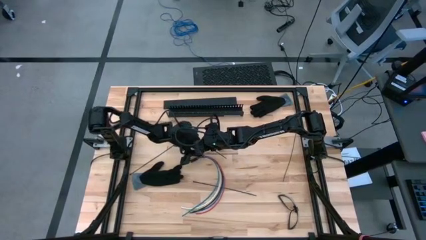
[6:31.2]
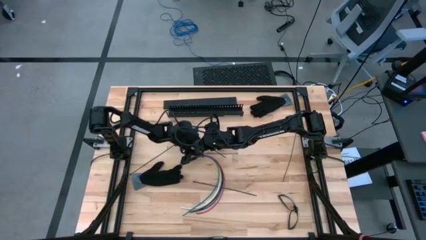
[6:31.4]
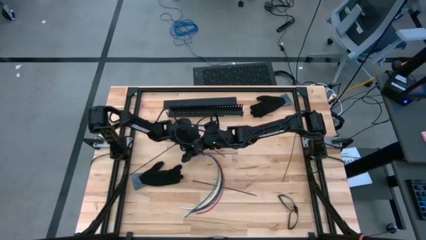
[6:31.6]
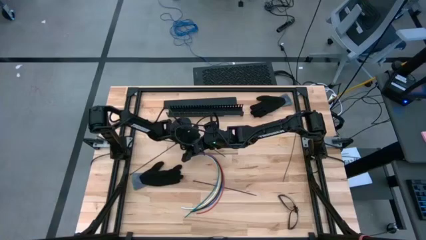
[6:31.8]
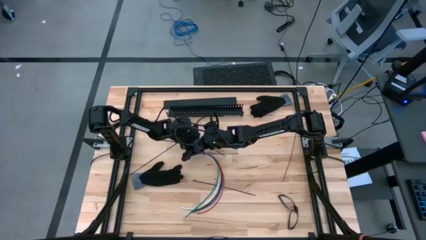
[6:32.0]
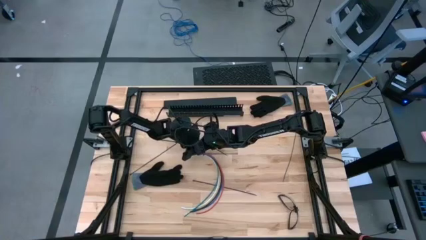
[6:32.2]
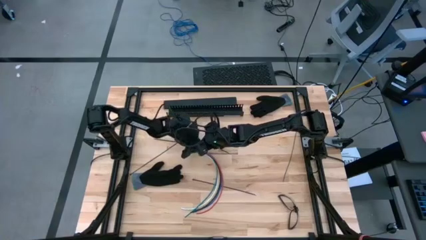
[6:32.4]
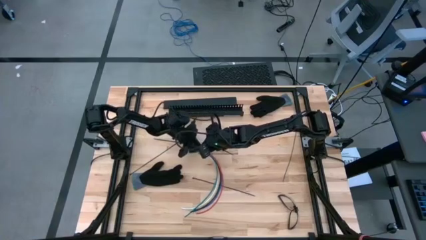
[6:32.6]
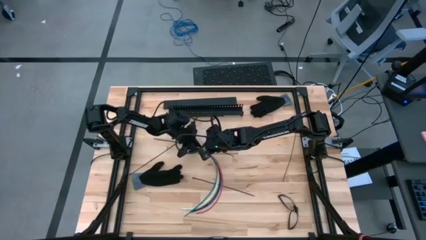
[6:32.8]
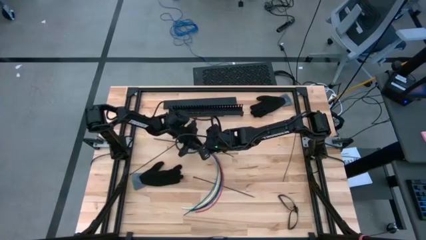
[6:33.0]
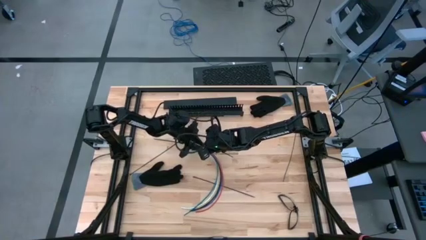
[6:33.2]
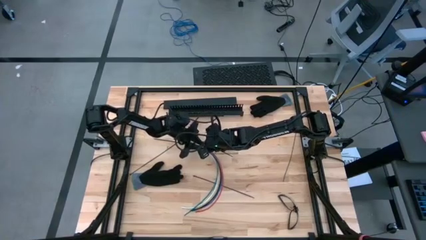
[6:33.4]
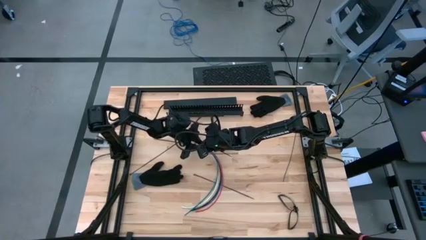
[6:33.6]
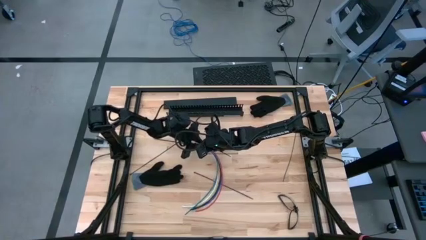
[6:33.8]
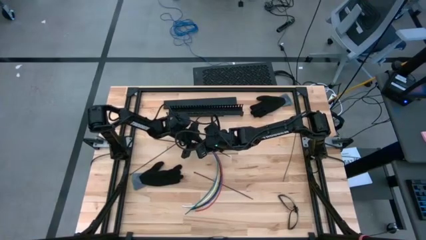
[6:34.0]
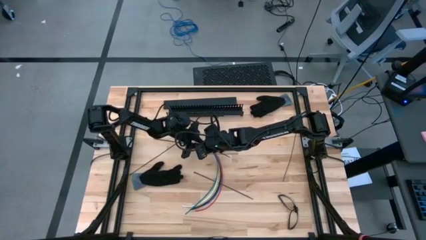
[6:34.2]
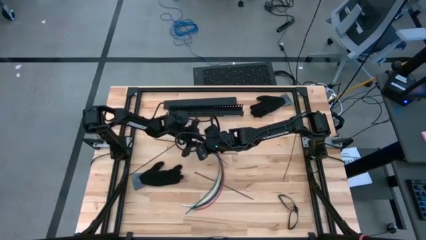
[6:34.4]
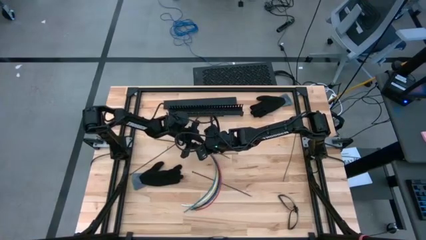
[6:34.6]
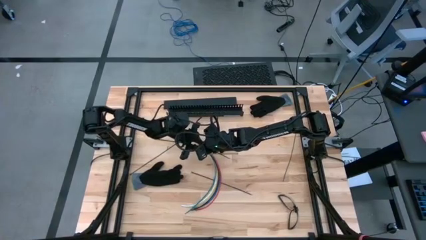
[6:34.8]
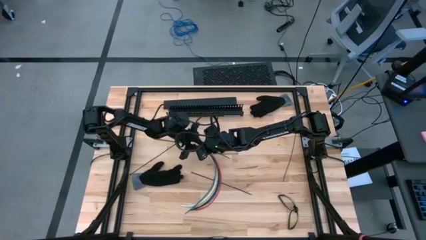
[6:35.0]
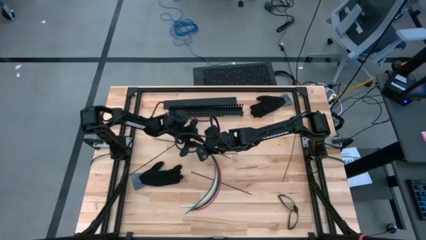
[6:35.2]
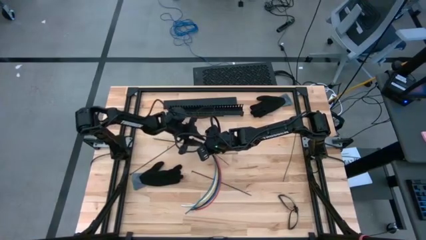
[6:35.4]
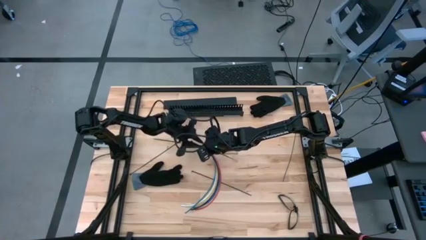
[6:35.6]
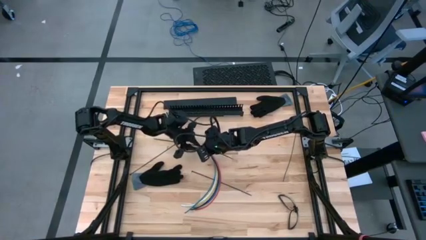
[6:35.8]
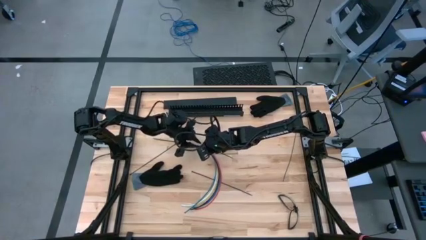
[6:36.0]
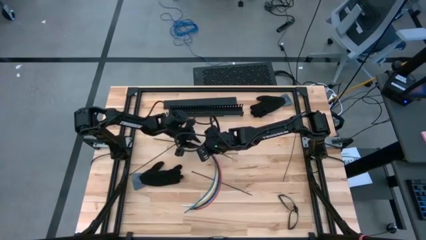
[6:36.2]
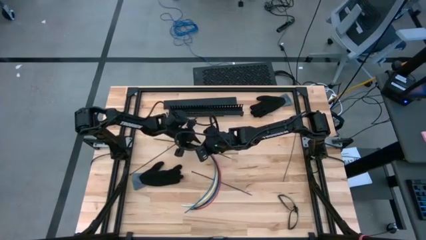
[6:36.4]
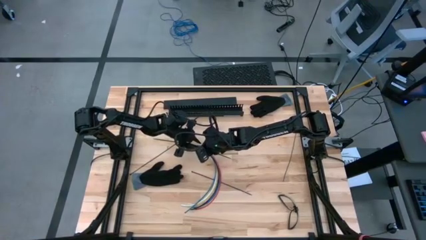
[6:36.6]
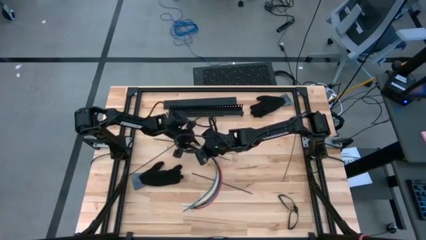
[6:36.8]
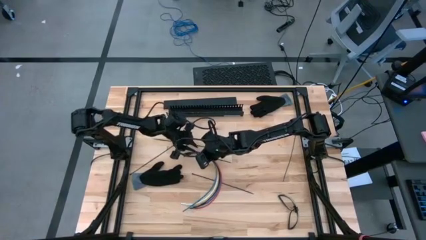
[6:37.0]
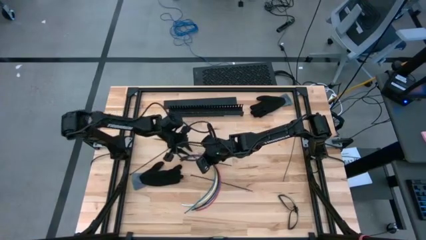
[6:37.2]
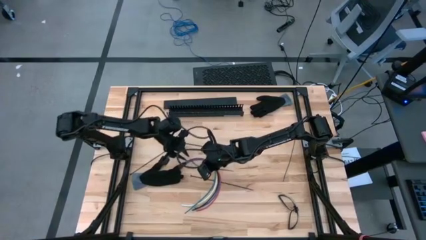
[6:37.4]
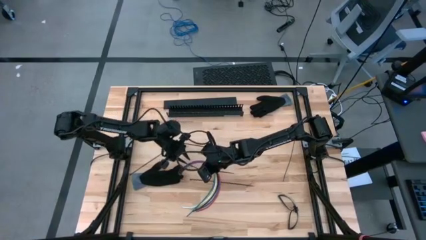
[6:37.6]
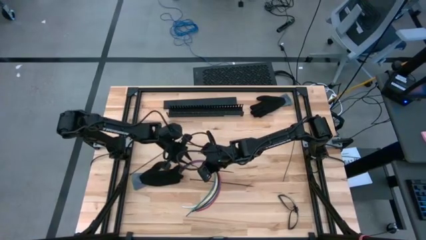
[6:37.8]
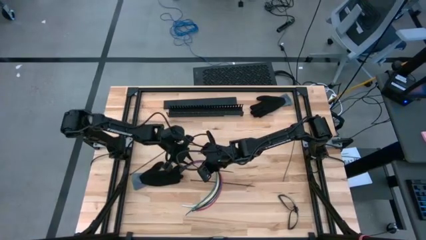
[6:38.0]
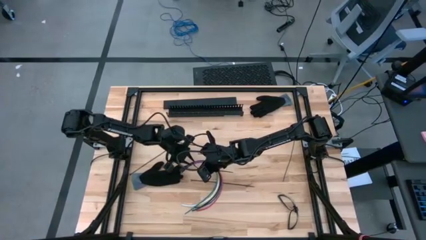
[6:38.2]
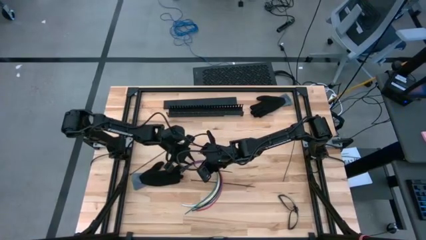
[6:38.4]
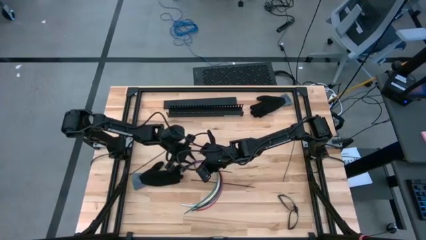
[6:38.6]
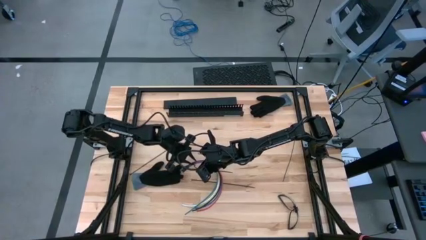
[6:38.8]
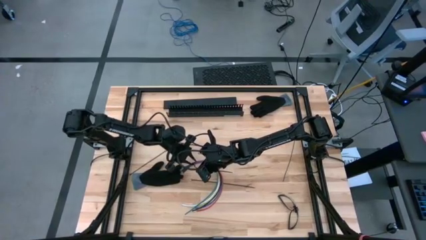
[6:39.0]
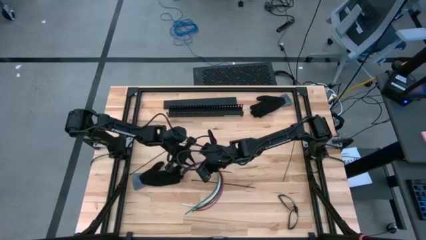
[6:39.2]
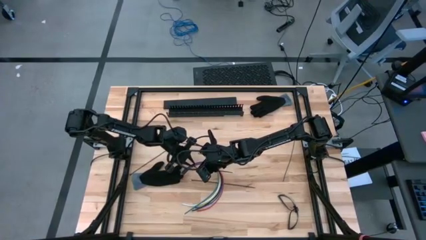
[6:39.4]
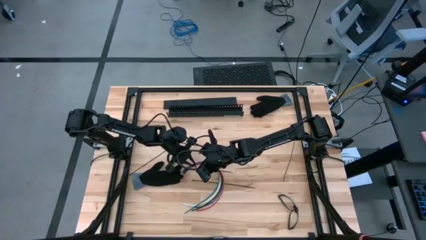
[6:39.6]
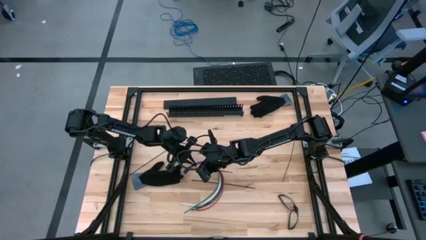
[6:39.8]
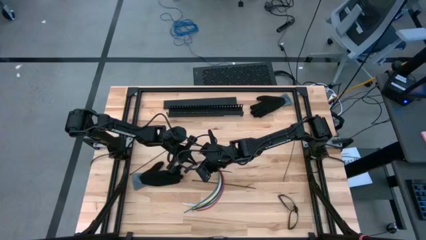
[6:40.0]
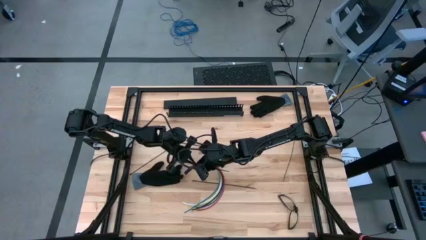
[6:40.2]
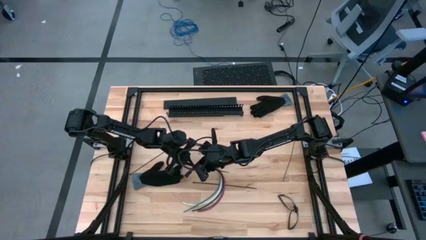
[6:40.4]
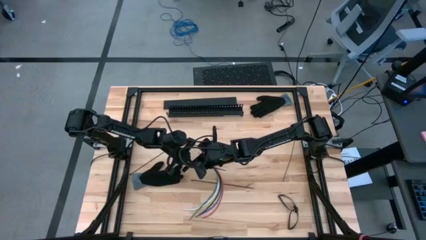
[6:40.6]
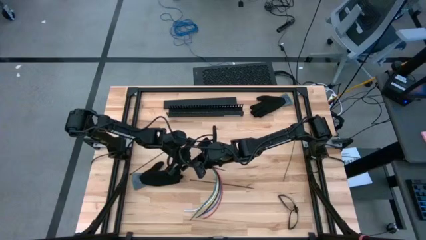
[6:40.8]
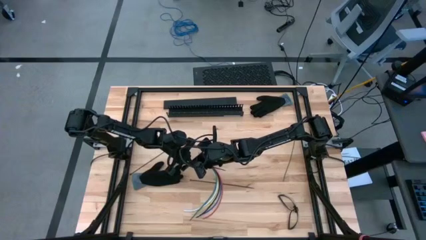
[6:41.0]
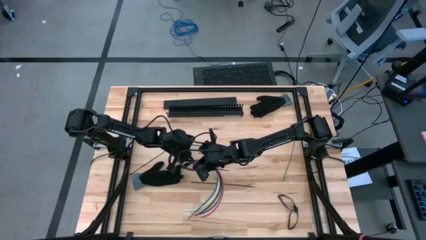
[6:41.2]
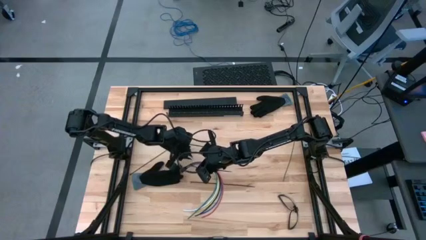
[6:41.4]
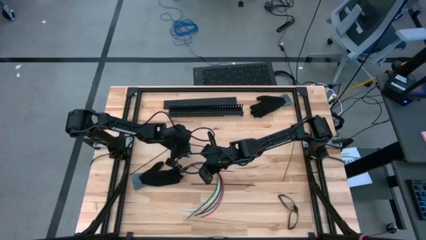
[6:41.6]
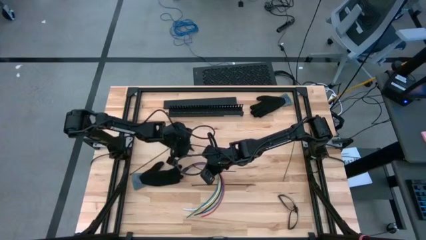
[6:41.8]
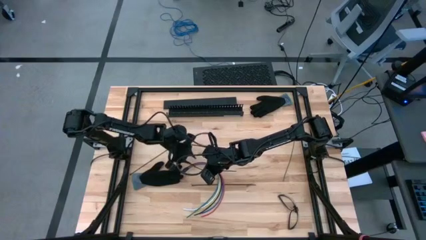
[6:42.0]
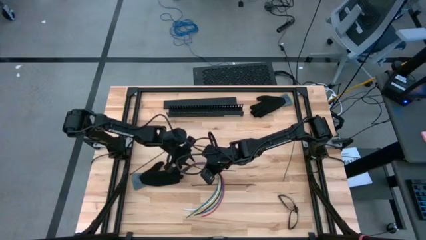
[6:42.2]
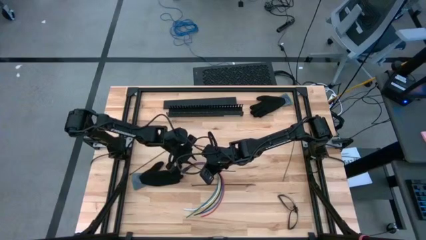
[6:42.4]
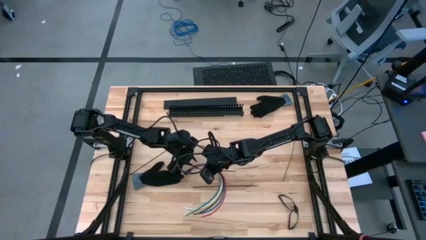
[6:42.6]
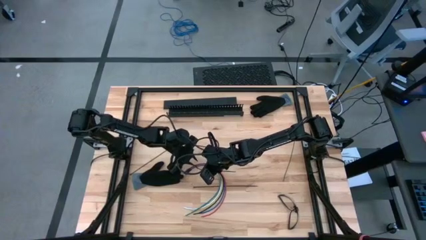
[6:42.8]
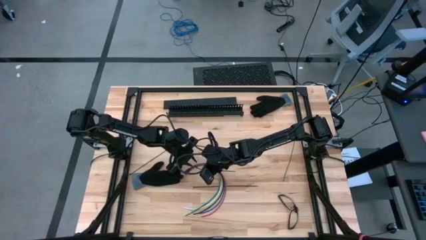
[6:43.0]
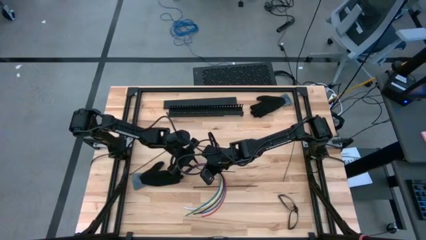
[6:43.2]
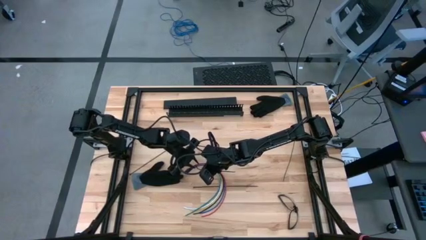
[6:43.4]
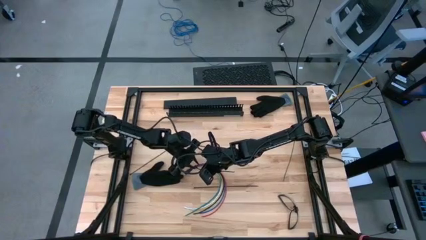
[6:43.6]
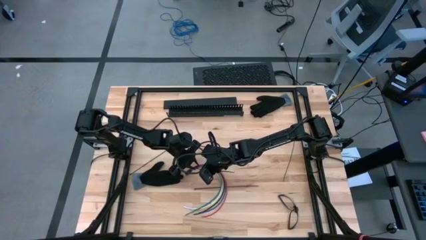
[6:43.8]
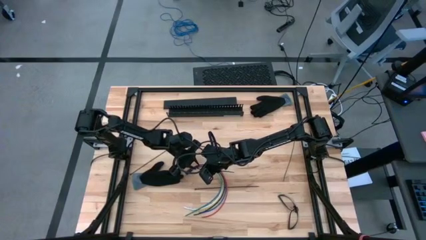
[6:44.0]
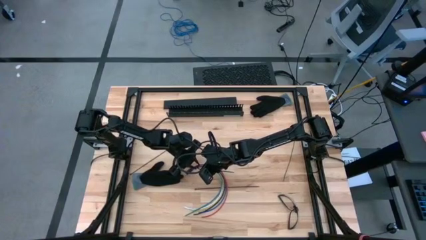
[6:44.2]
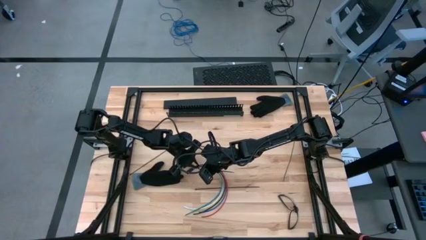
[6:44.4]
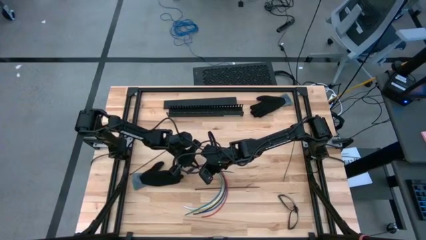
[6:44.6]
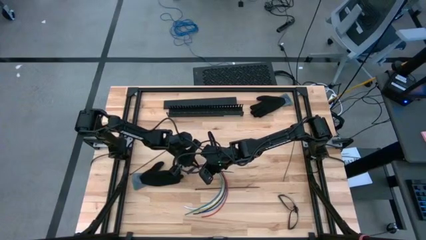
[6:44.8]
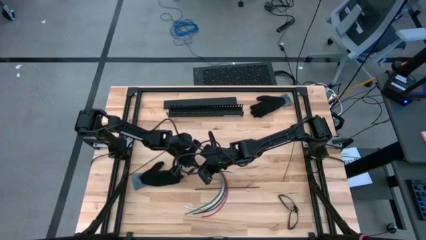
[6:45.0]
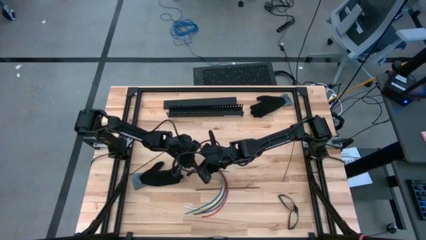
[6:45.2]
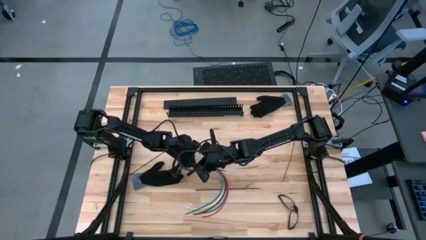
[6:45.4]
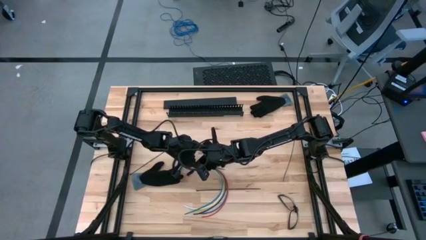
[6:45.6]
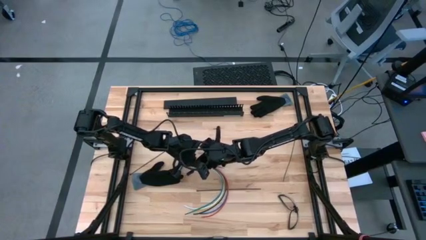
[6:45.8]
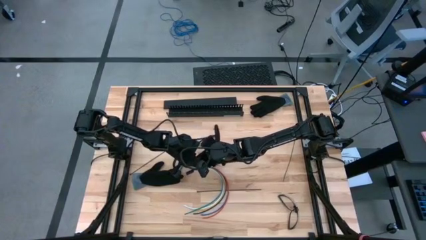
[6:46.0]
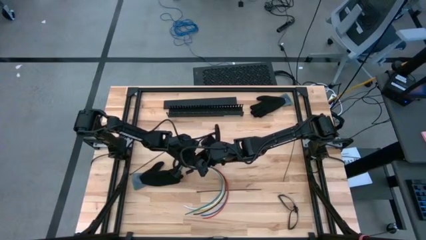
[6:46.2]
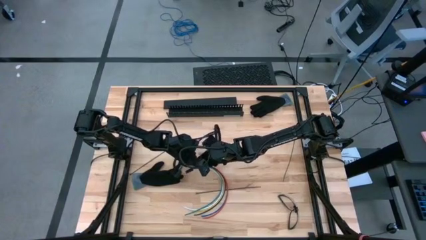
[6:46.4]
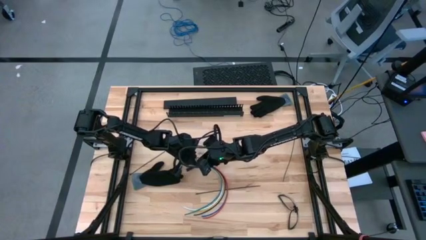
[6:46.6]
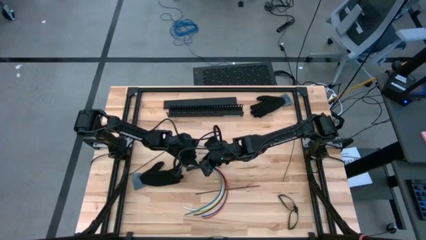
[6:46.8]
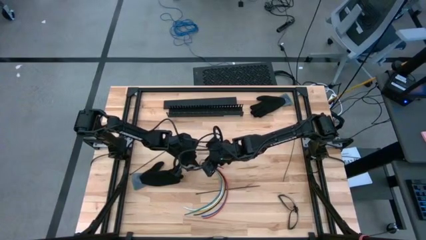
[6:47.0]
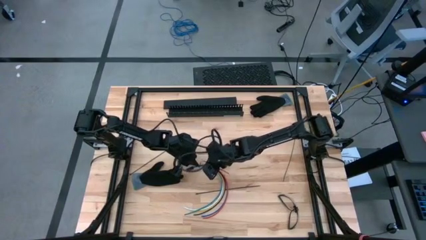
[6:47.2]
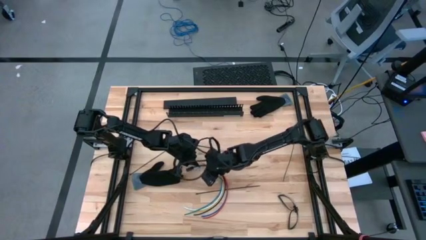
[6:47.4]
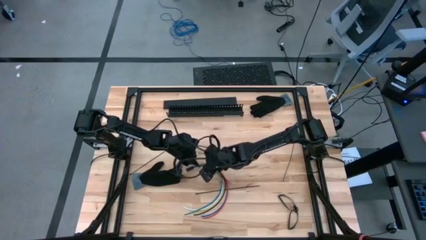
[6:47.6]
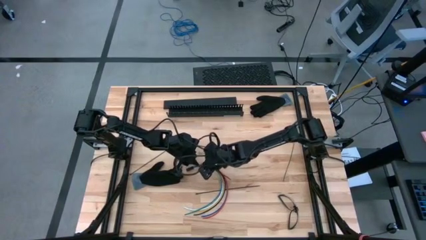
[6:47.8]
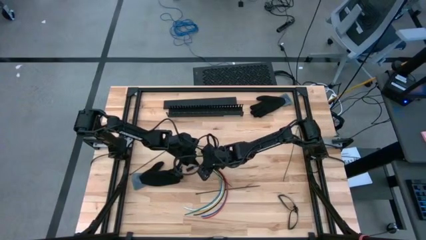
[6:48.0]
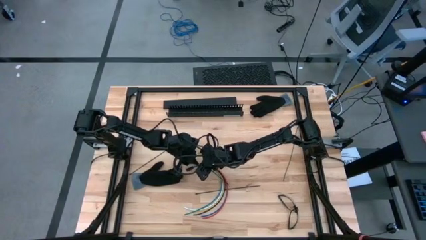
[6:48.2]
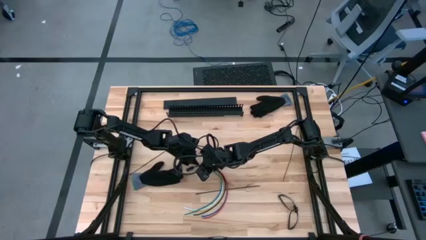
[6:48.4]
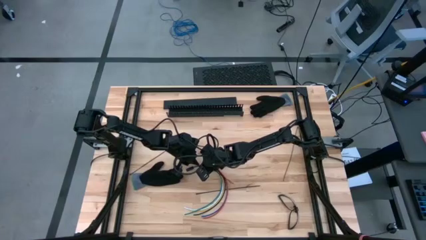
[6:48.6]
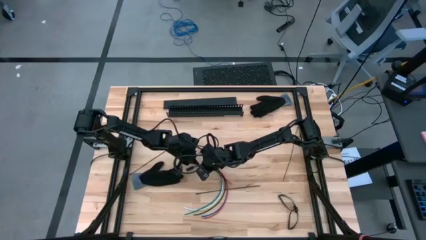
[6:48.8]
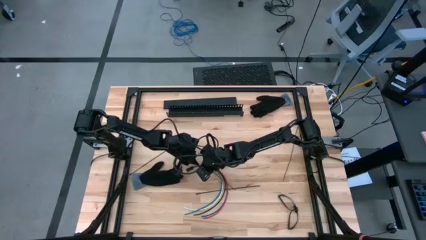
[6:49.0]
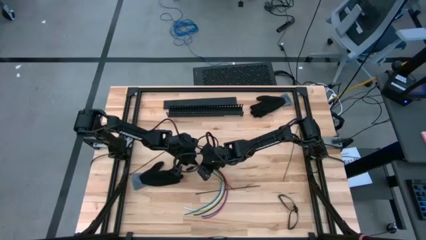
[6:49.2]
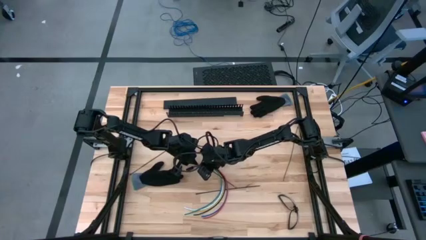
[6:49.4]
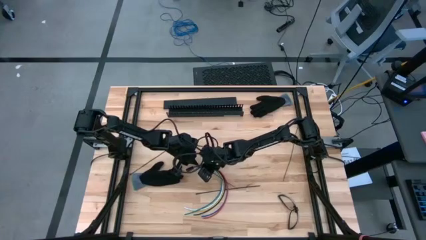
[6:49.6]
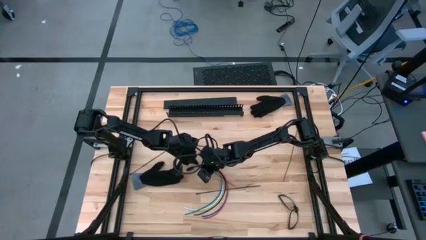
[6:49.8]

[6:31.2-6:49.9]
Task: Ziptie cables
Wrap the cable wires using a zip tie
